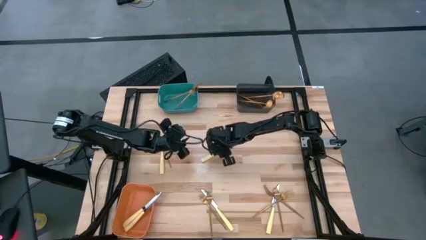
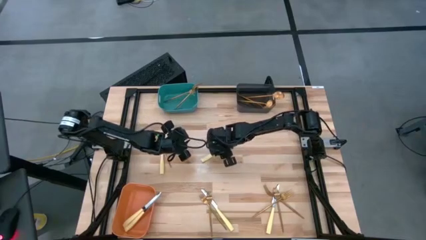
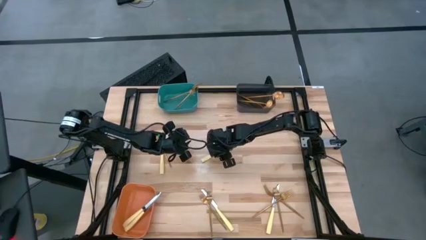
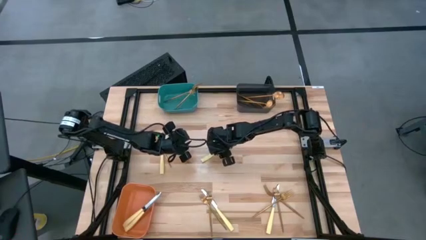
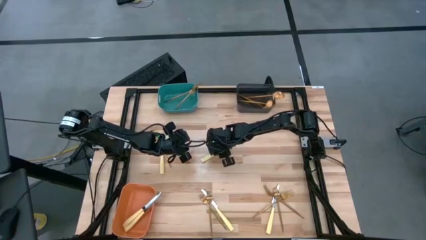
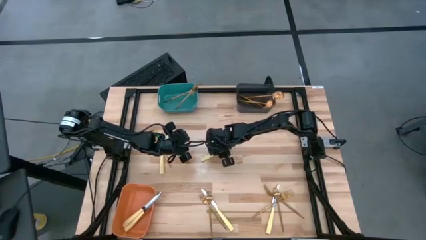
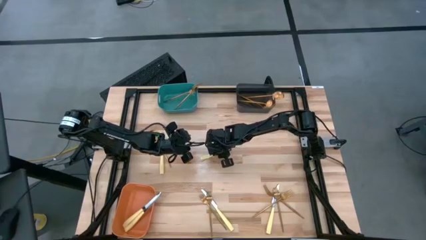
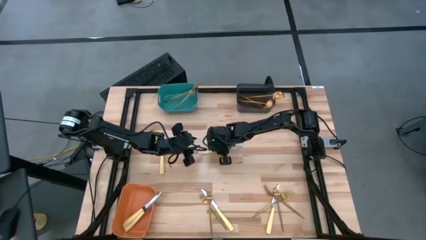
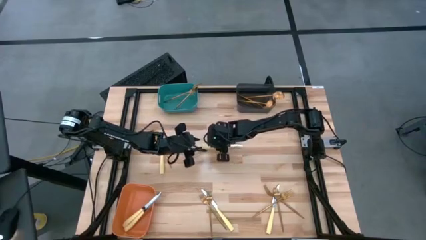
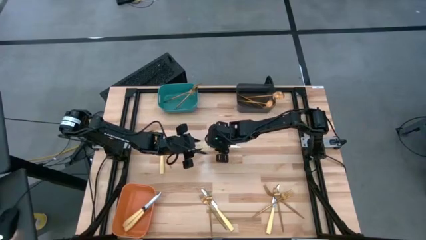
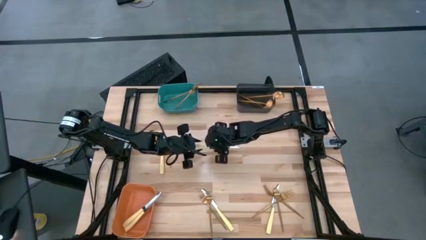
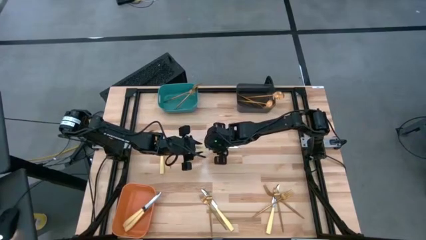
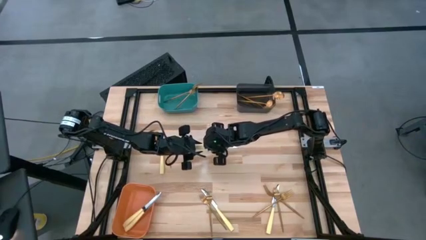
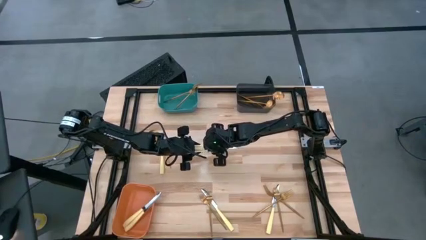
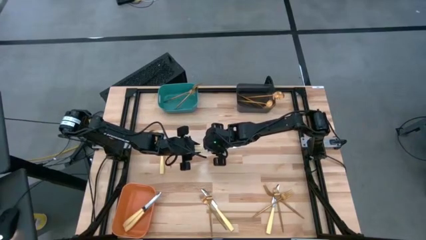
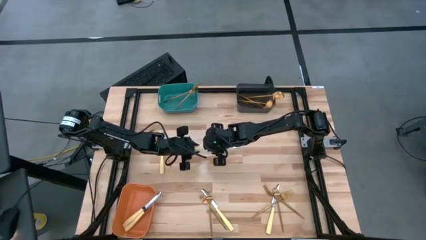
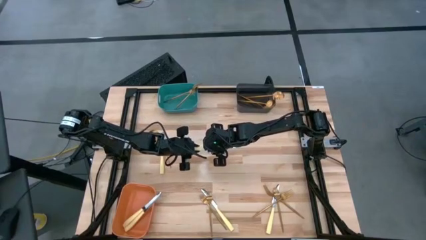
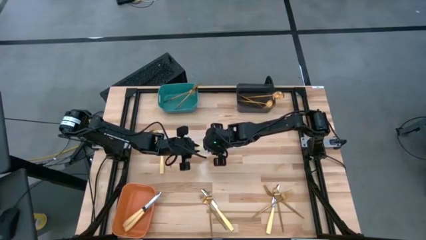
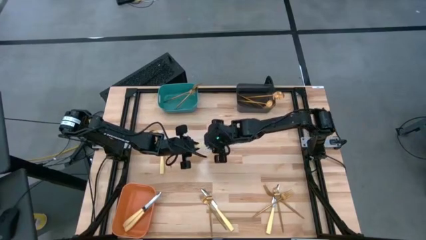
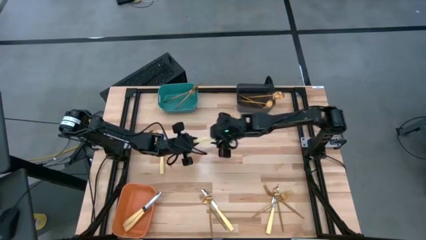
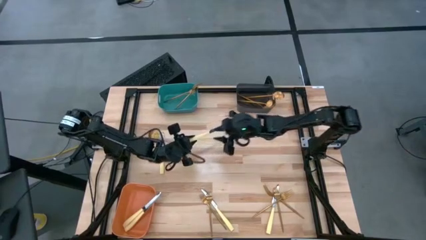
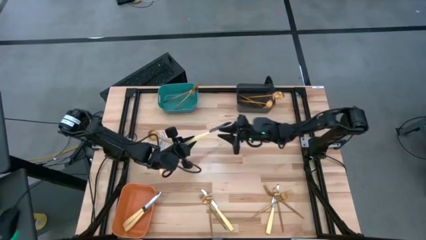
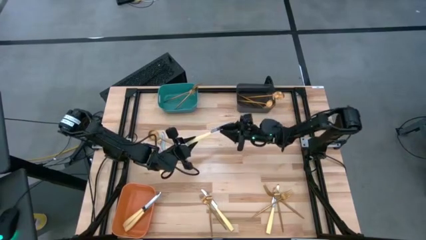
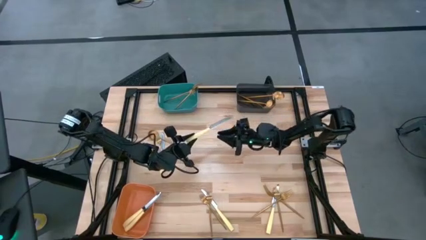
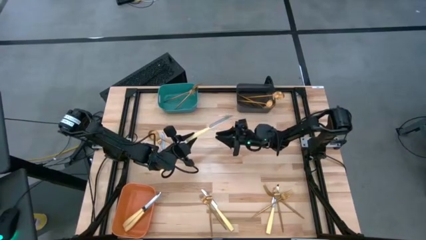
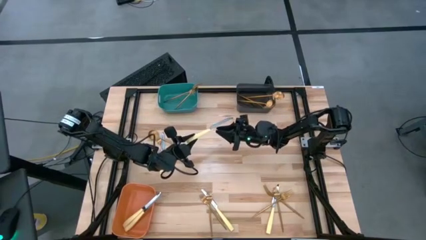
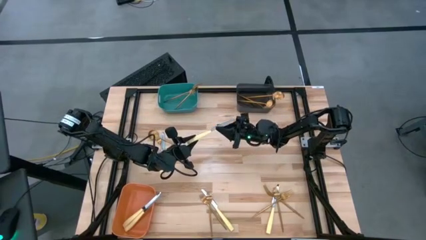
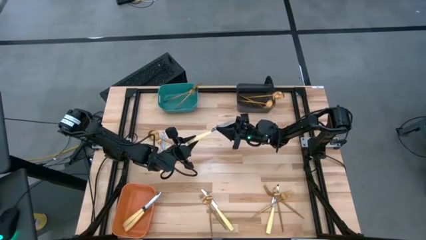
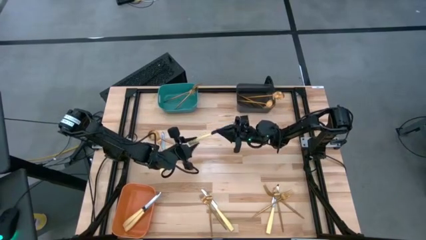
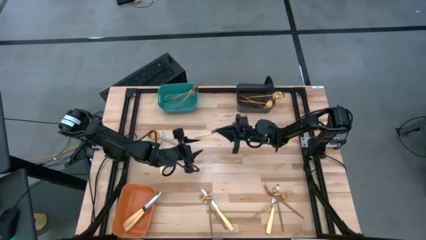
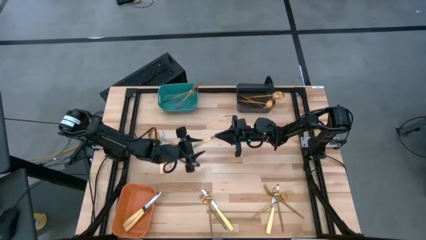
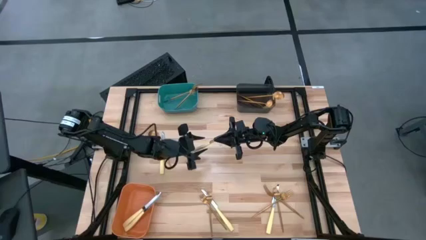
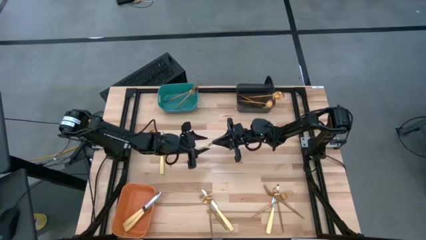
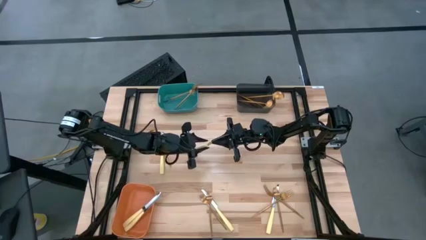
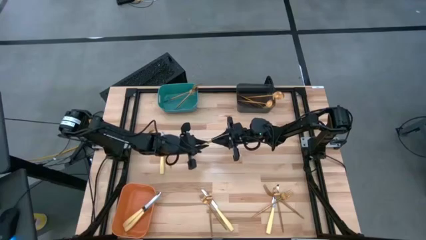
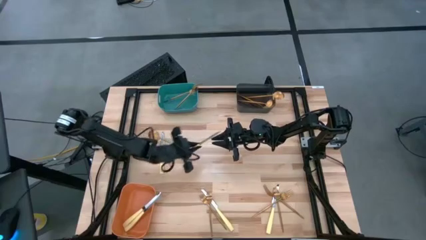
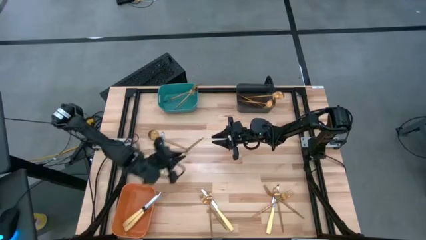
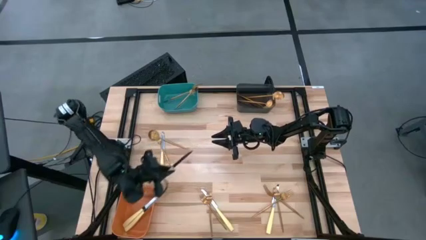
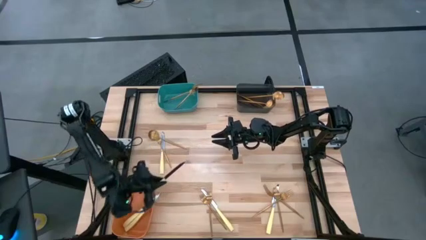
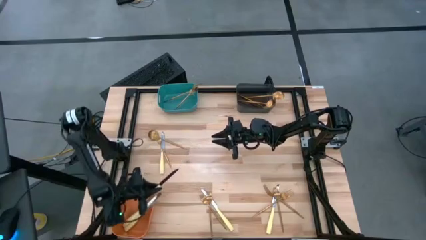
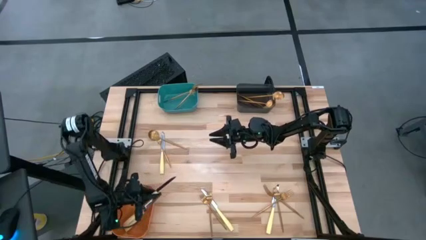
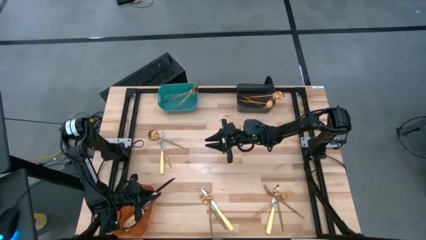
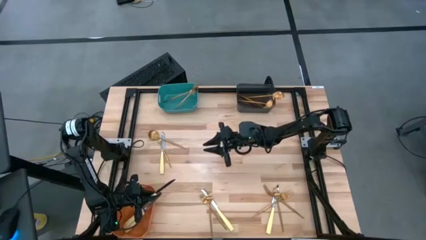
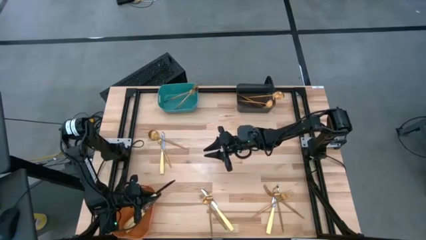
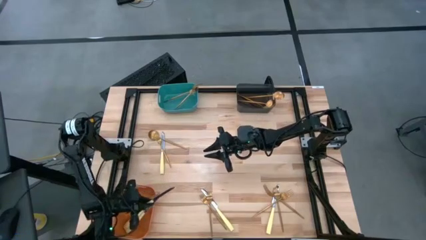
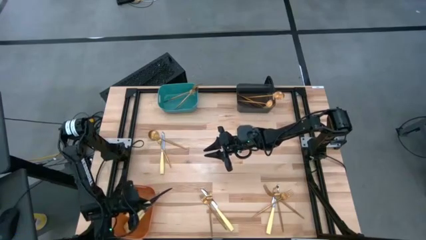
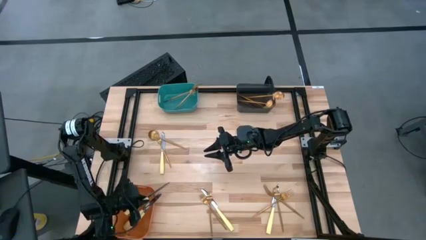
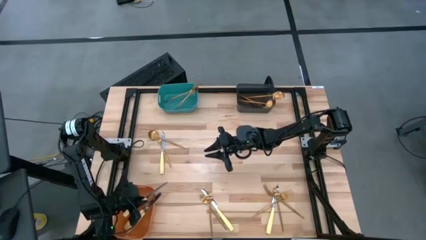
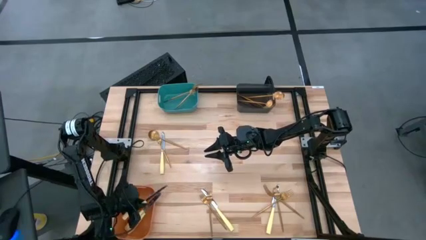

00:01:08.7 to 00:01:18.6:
Task: Sort silverware by color (type)
Put the yellow table knife into the orange bin

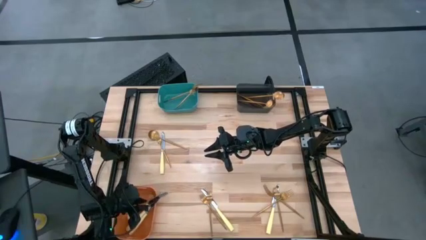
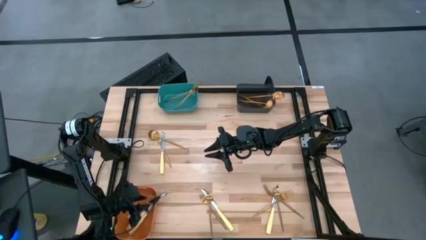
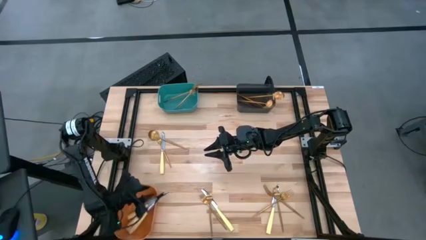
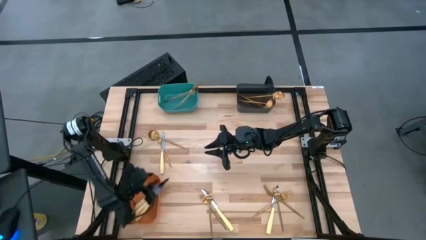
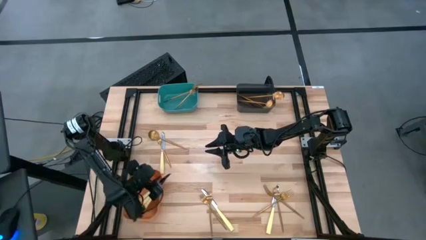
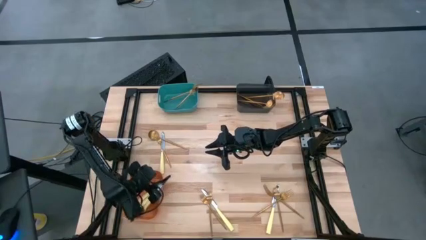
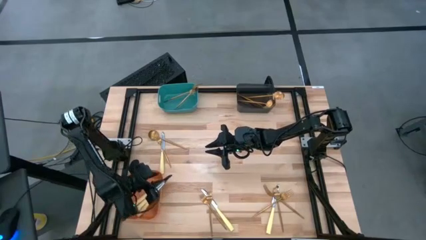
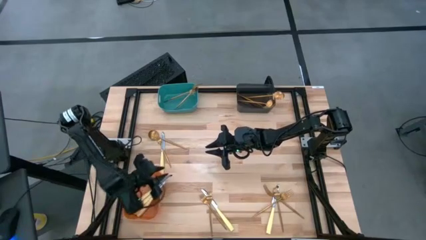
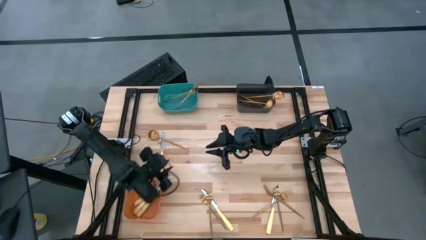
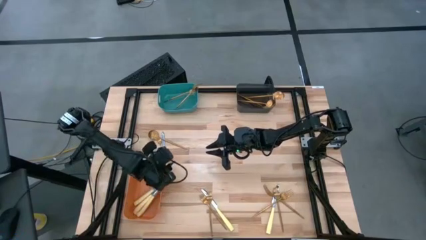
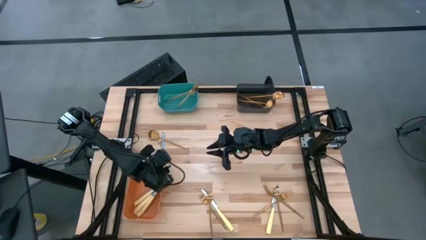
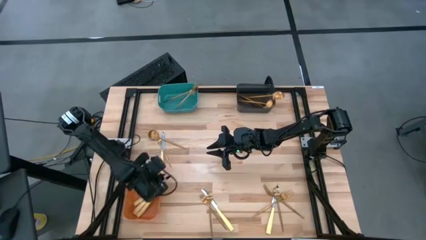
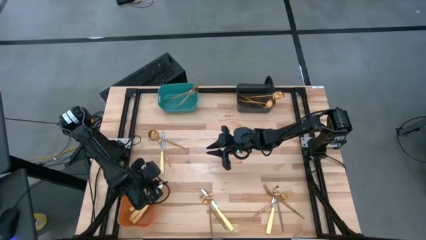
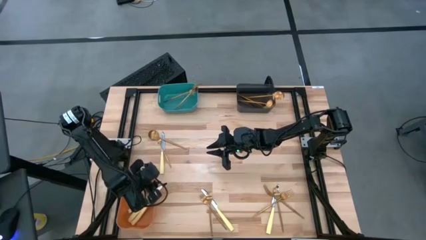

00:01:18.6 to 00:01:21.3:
Adjust the orange bin

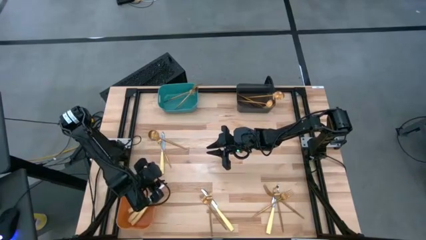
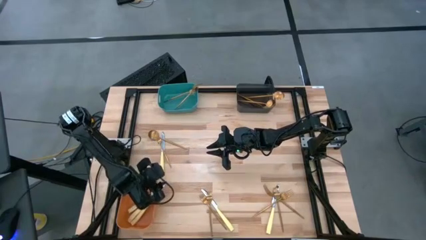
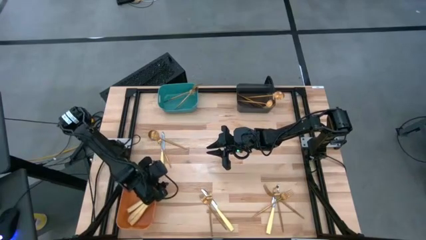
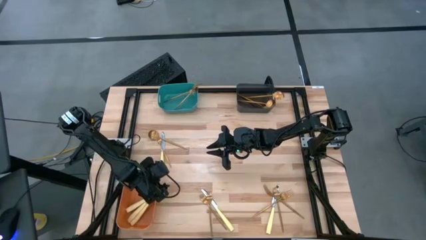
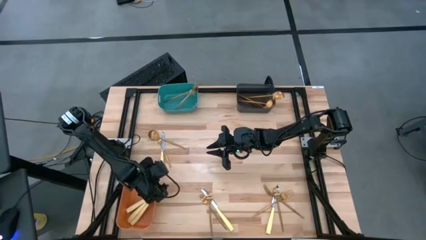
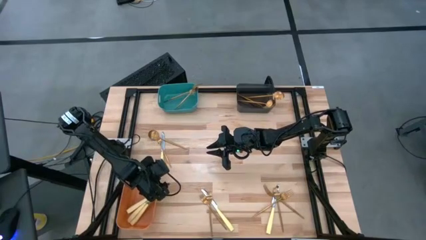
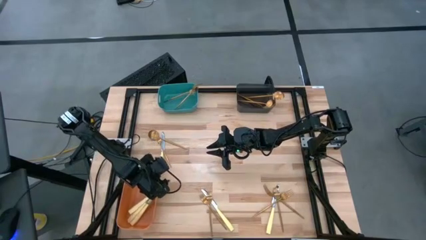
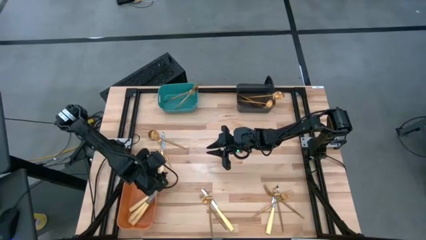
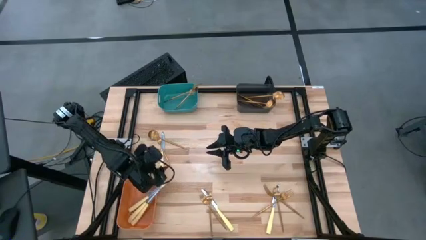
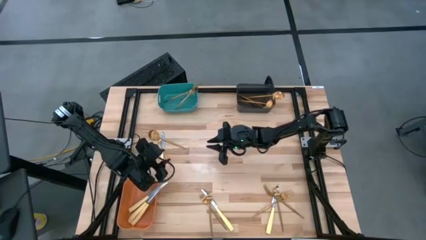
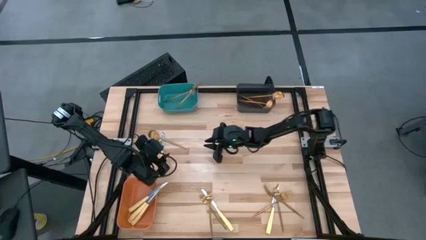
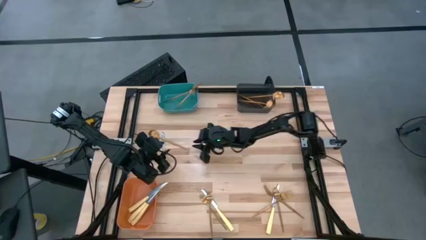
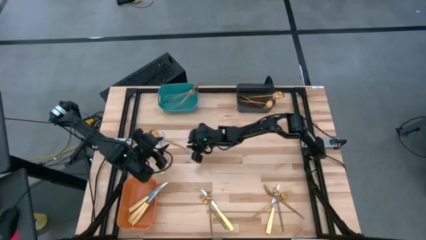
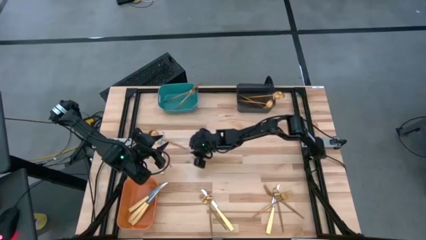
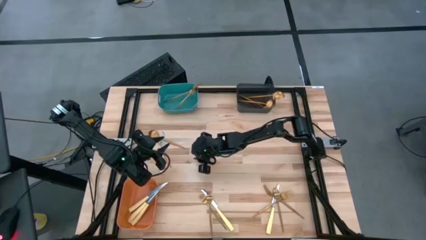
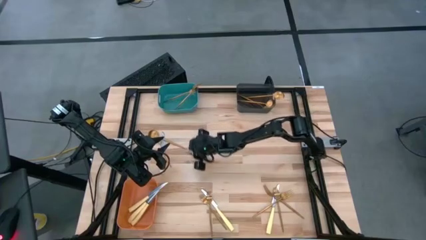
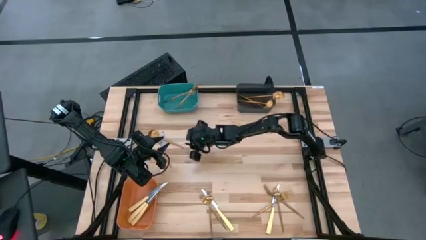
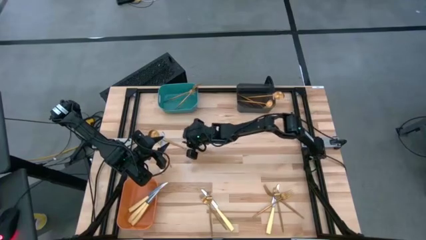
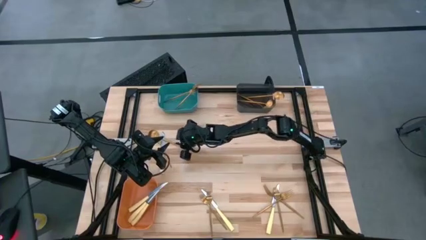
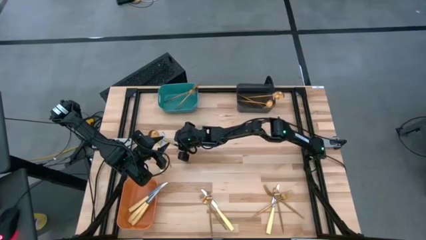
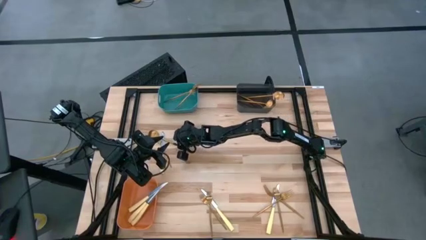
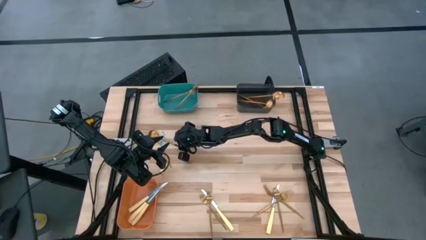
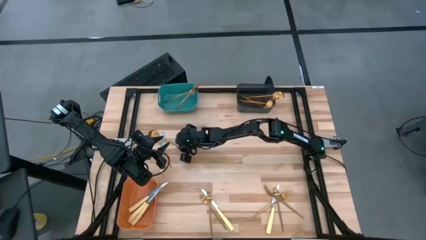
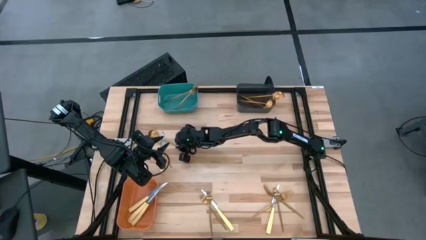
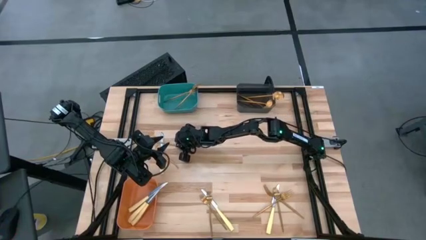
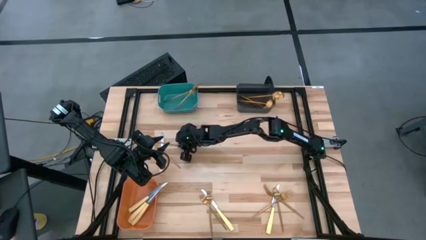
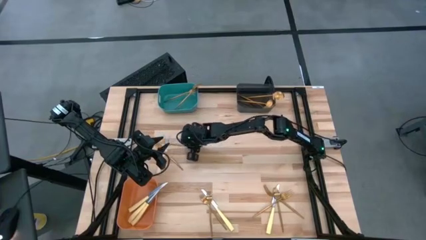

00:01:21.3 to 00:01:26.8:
Put the gold spoon into the black bin
